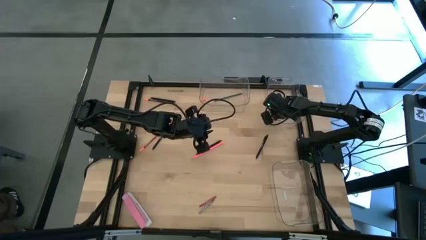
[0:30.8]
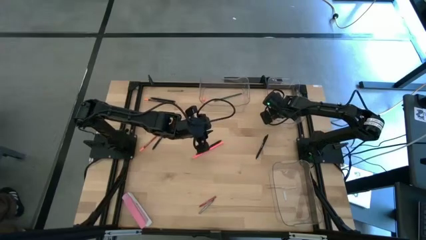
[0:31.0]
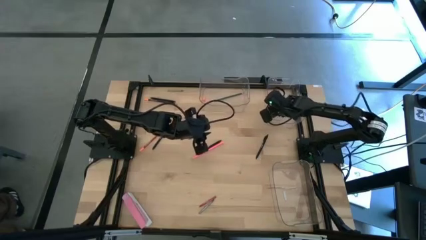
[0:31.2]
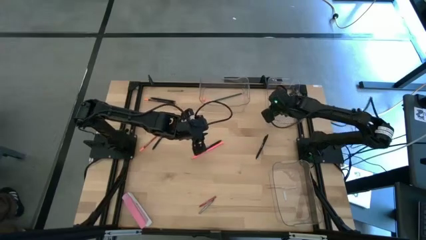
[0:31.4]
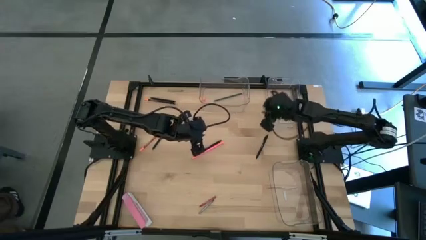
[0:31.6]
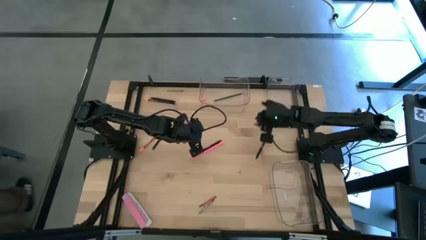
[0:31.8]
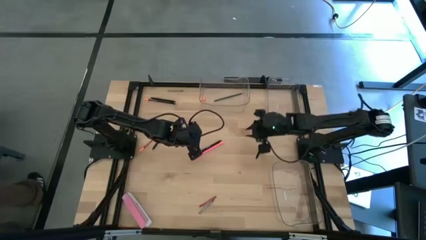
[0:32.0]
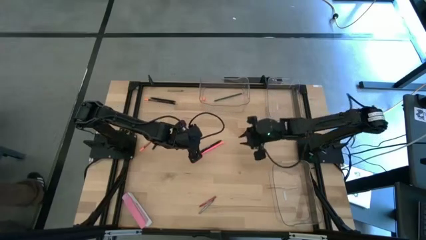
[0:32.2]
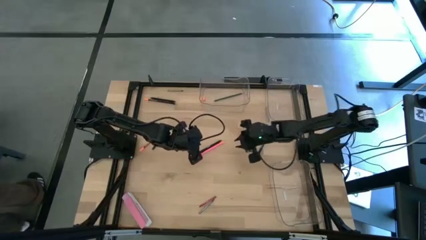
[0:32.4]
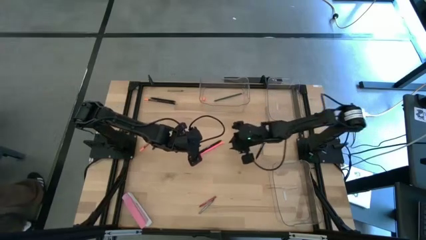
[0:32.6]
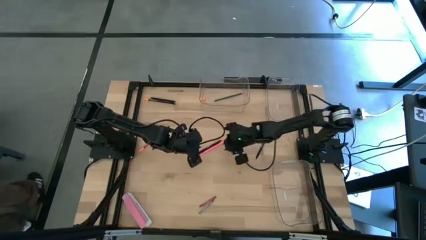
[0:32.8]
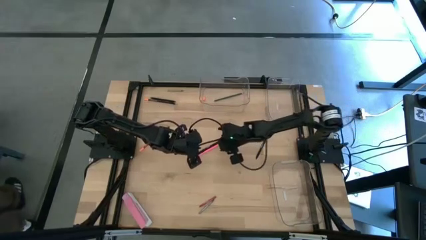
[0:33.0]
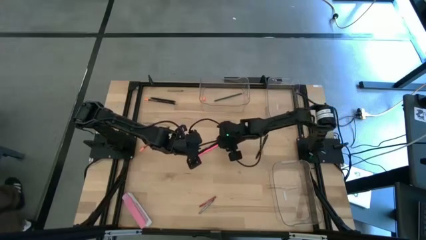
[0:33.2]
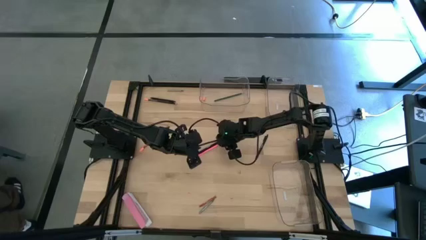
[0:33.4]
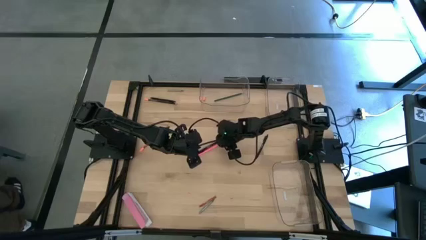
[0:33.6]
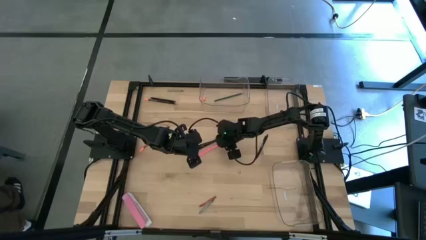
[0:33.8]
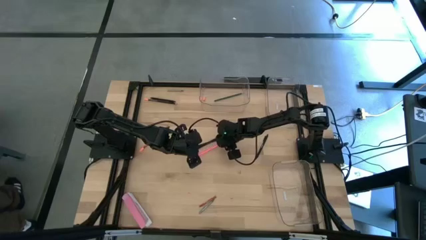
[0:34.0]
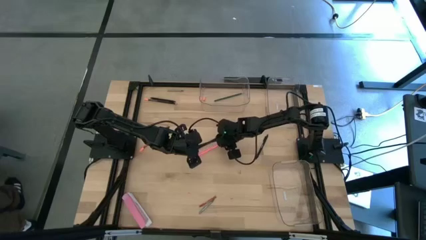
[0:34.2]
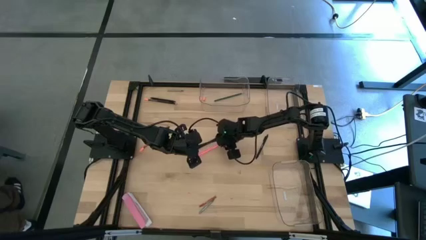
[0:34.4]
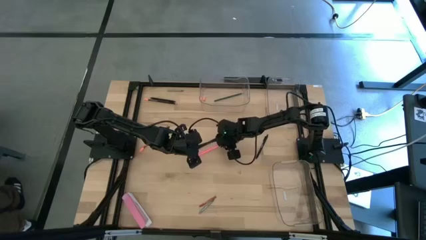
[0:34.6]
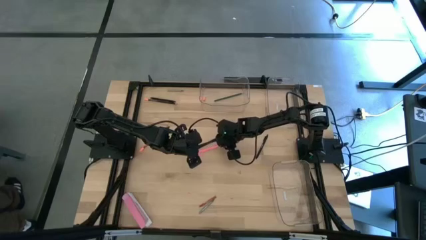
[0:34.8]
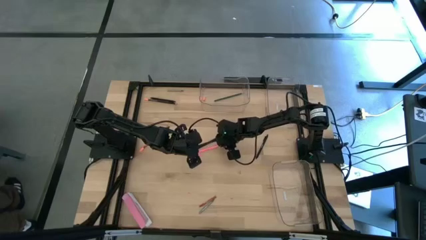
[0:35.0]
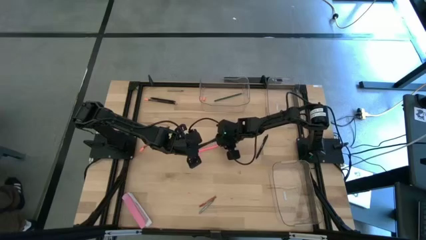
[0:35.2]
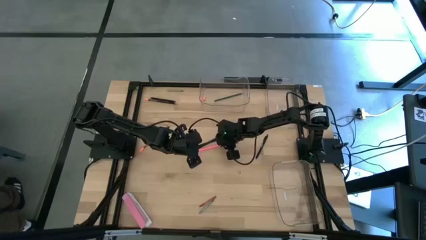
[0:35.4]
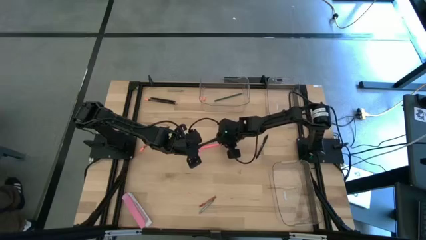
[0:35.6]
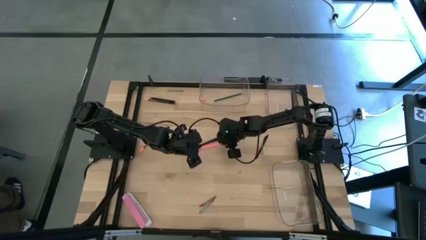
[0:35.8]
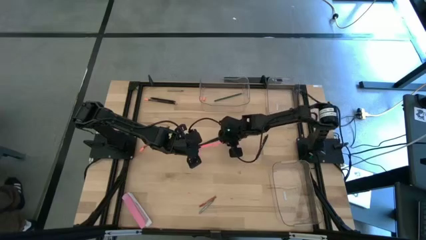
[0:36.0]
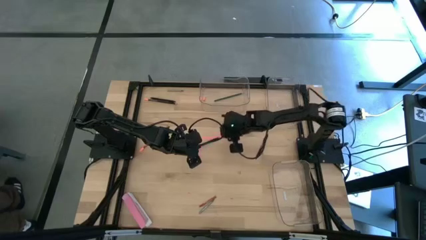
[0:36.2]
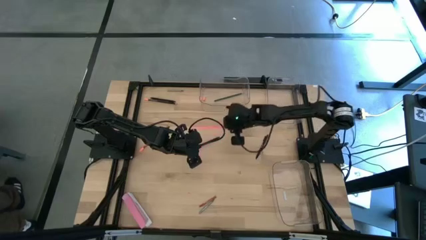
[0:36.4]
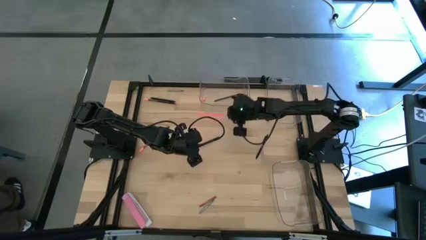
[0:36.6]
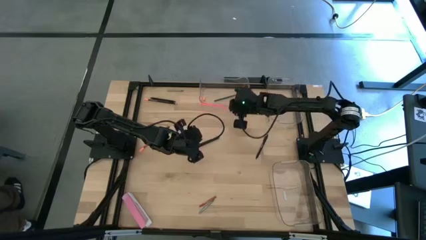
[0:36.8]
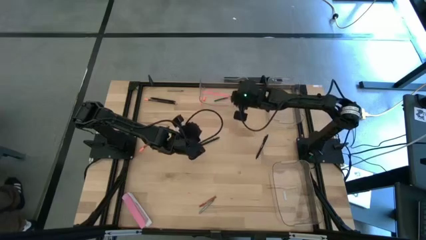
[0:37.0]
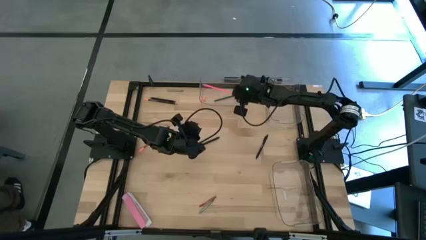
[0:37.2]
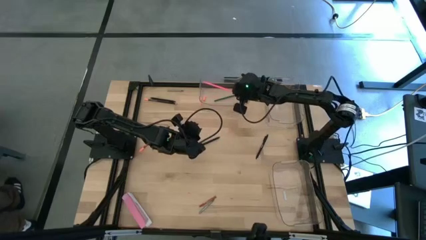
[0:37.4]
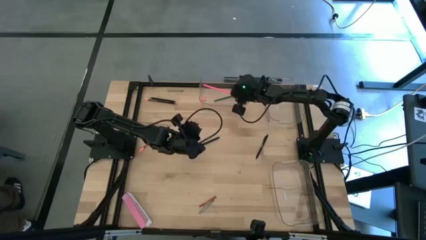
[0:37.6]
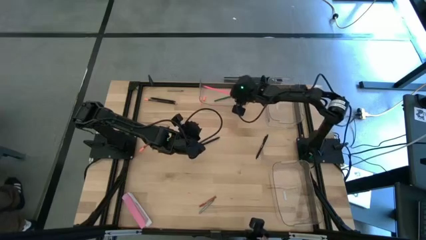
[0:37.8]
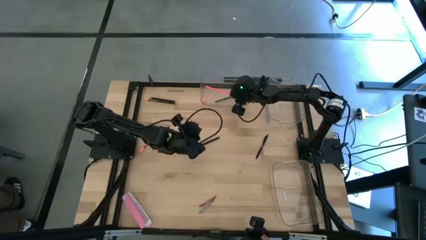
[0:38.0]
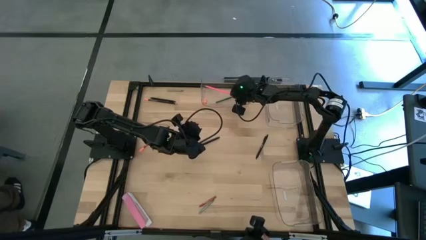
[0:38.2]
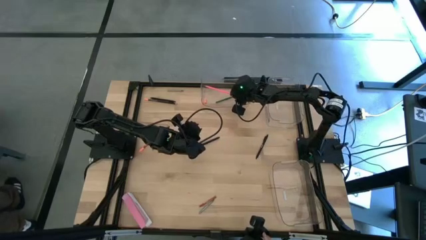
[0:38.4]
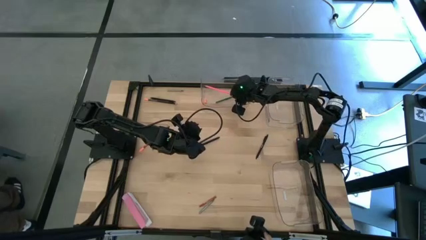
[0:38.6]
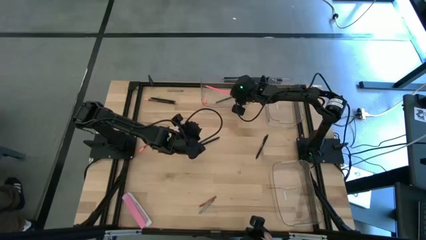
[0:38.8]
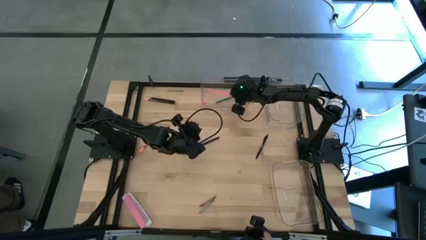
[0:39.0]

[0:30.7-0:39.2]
Task: Sort crayons/erasers/pens/pencils in bins
Put the pink pencil into the top left transparent bin

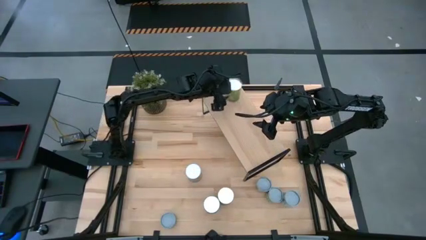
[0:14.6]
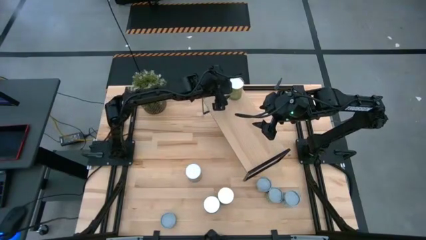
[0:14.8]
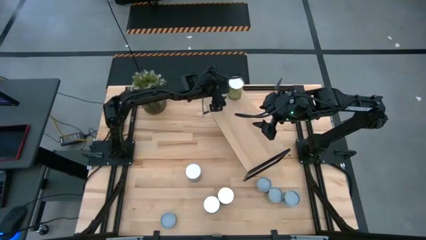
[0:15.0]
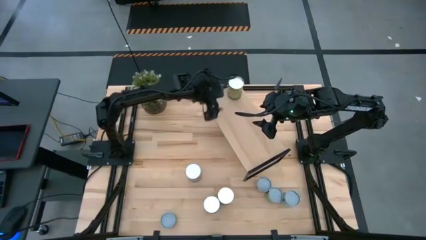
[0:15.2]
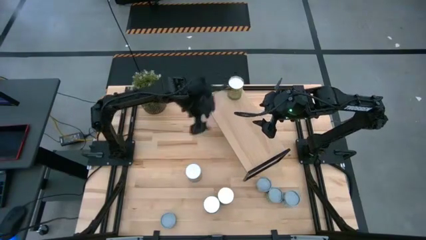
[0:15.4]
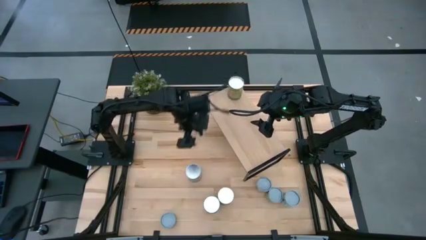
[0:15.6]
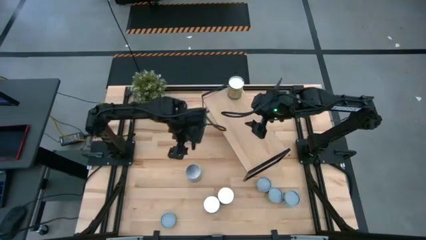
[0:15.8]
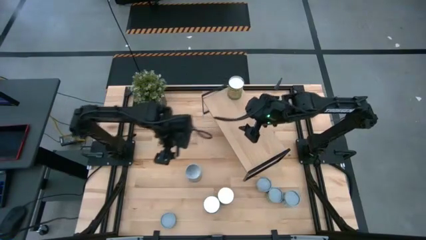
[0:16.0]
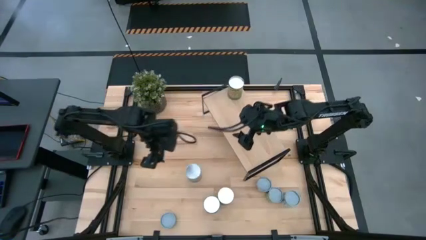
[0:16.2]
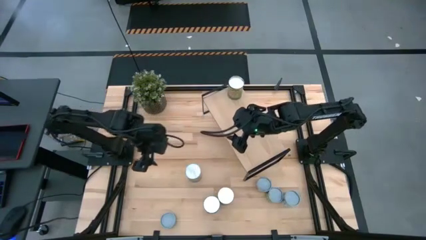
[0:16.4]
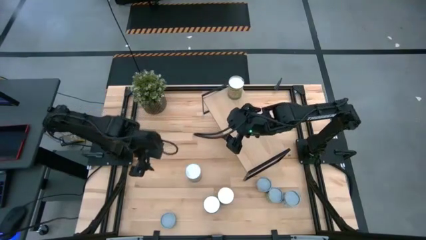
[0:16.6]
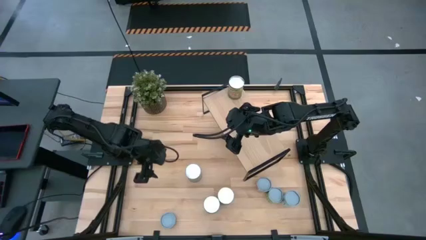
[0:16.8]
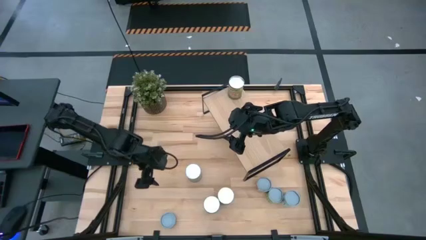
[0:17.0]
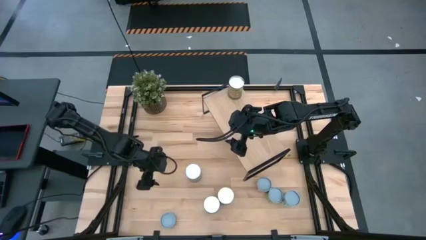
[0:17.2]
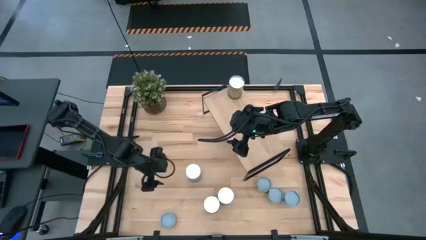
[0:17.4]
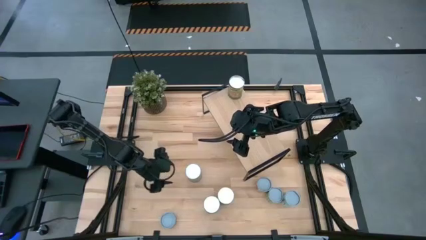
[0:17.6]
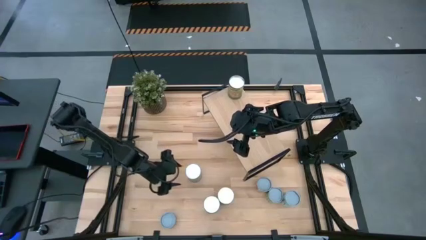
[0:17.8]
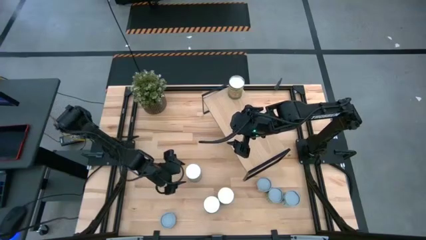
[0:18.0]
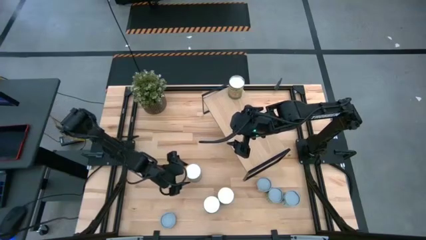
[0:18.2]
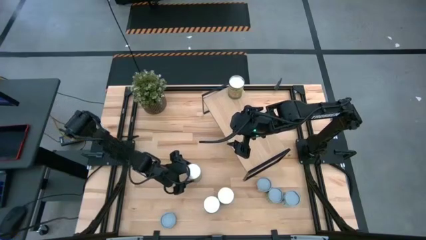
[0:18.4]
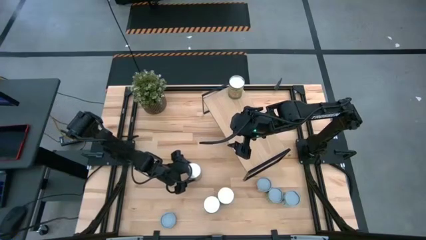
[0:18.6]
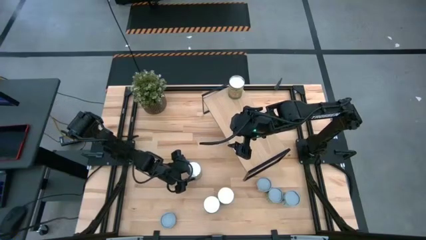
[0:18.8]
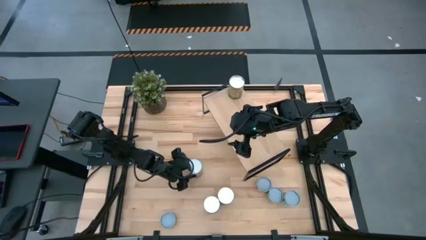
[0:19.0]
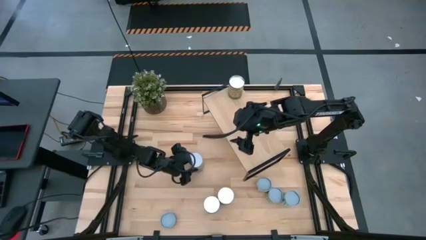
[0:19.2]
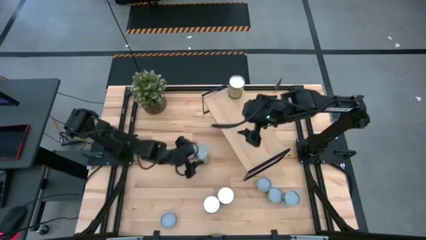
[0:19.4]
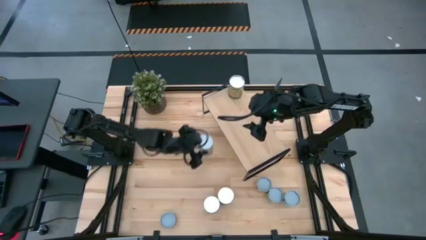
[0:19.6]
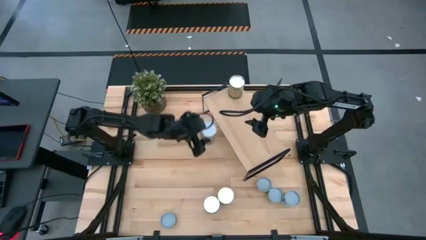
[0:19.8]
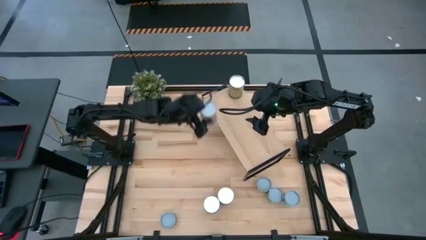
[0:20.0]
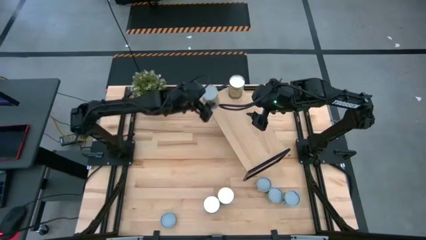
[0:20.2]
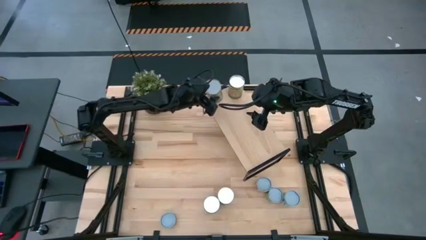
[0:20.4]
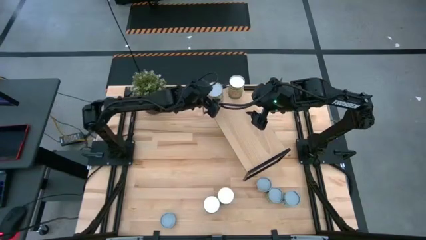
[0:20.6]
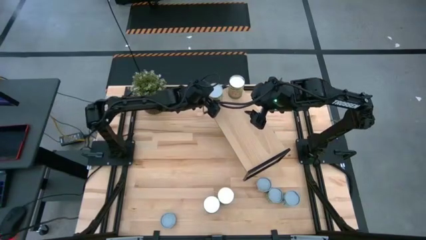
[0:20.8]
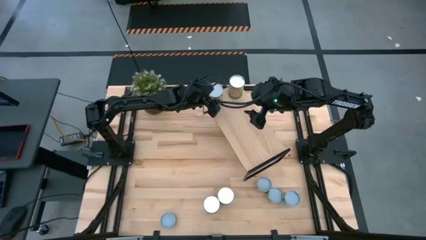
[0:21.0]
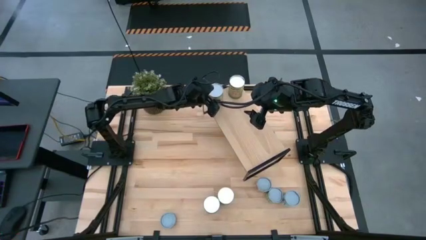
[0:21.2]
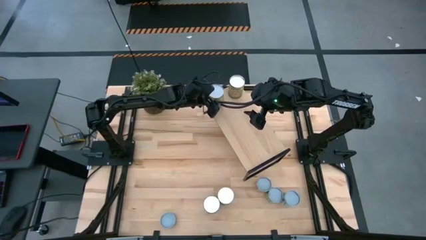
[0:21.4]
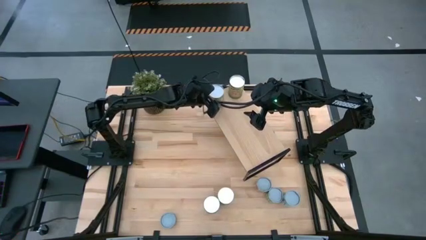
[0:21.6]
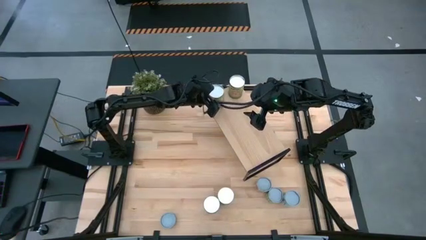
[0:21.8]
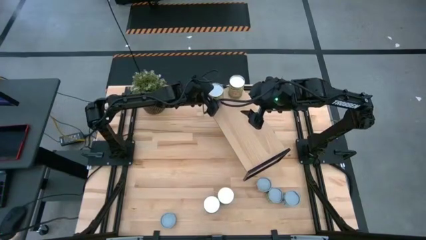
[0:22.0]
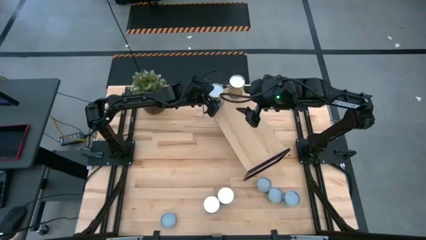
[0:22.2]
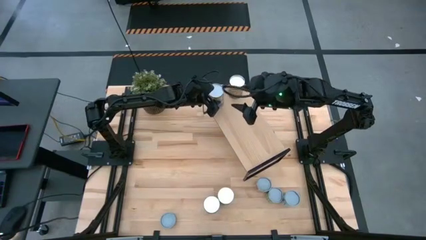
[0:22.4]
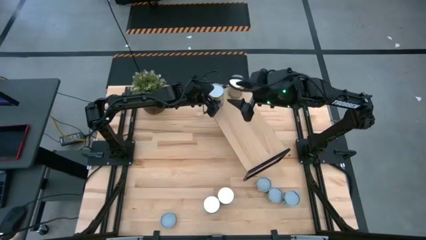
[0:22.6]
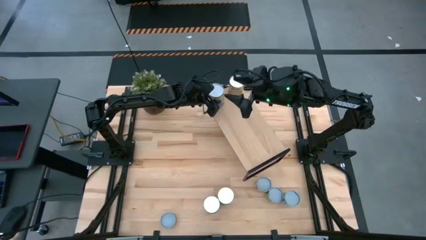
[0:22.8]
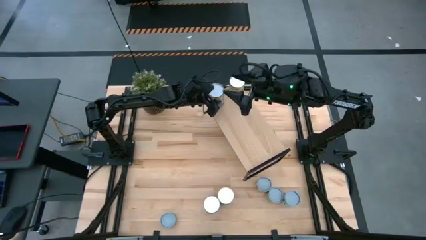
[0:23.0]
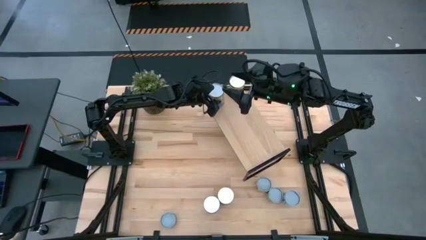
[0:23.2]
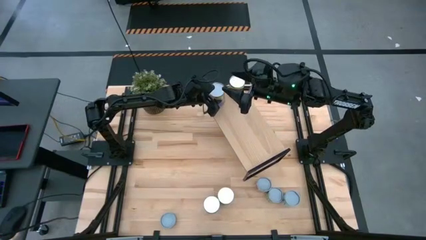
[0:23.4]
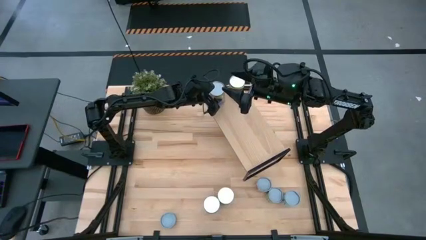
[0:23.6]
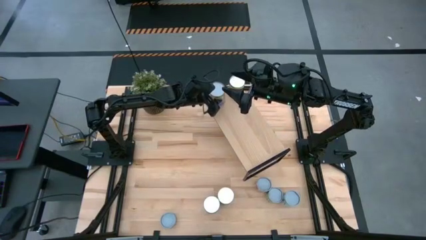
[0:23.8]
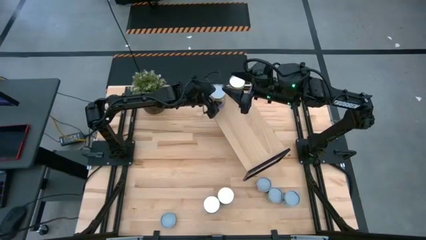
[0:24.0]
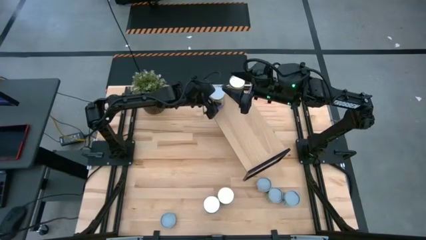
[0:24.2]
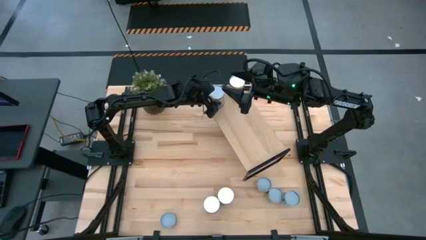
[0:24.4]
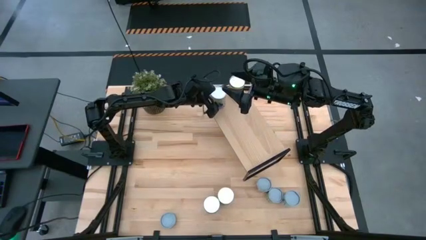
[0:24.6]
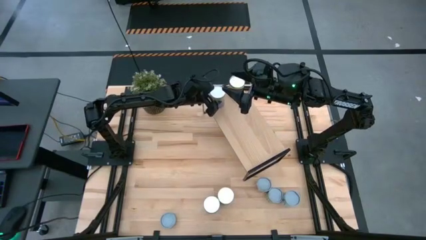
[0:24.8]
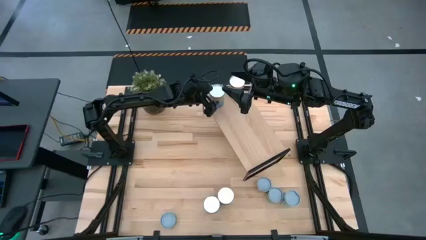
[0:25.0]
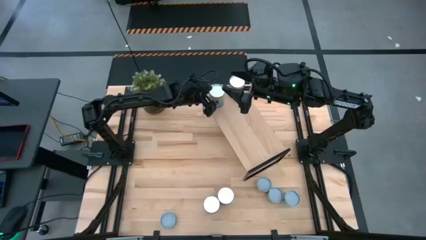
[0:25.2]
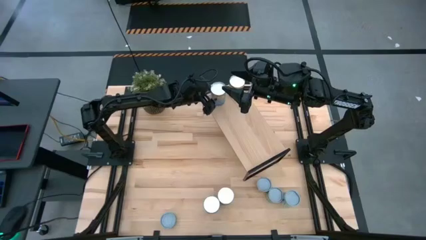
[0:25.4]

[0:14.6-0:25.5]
Task: Pick and place cans onto a shelf
Put the canned peaches on the shelf
